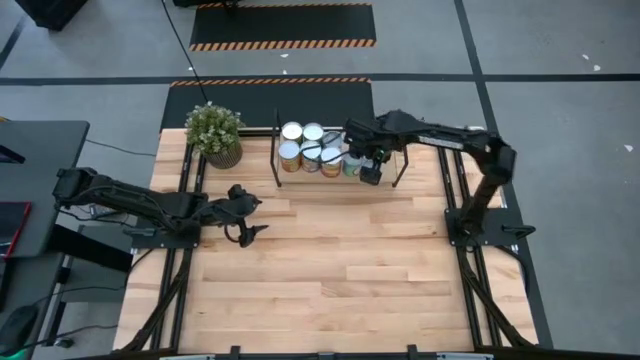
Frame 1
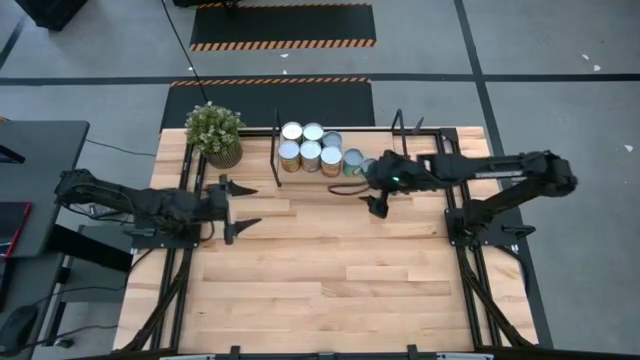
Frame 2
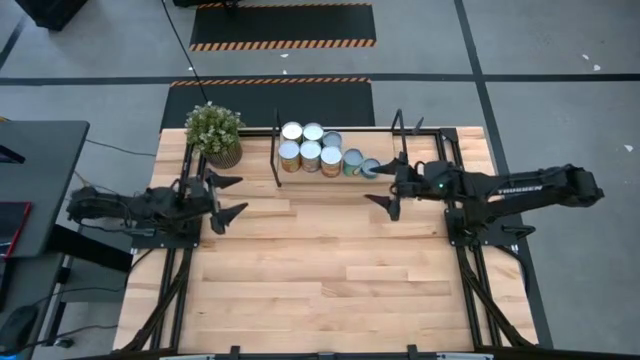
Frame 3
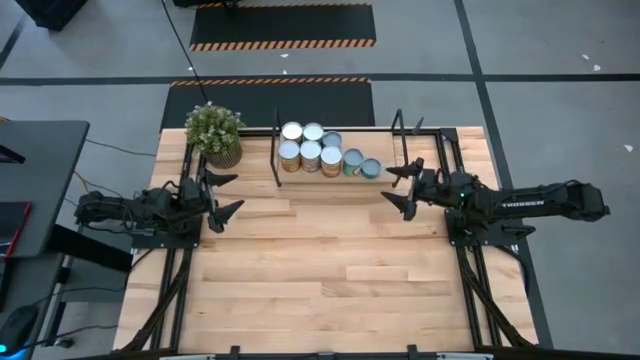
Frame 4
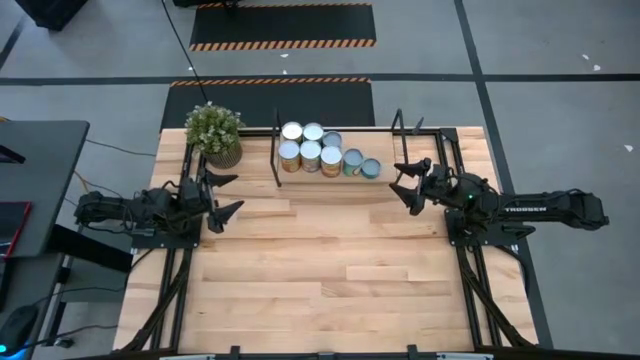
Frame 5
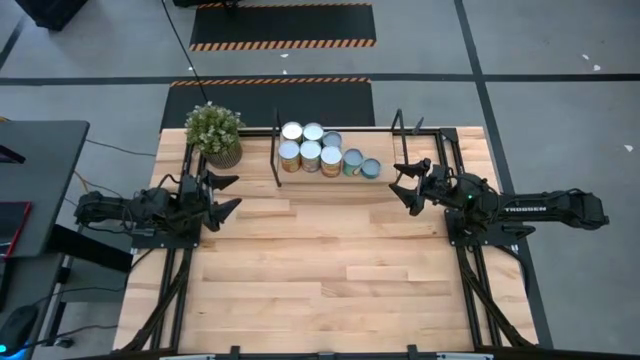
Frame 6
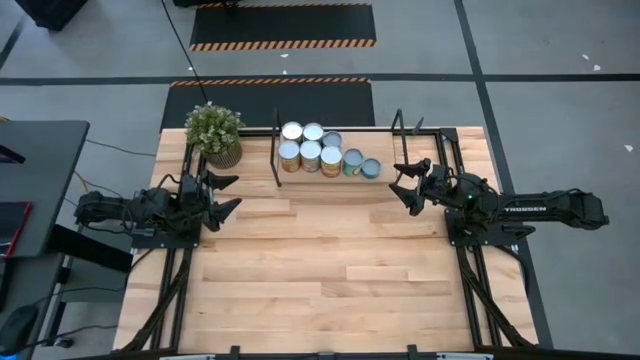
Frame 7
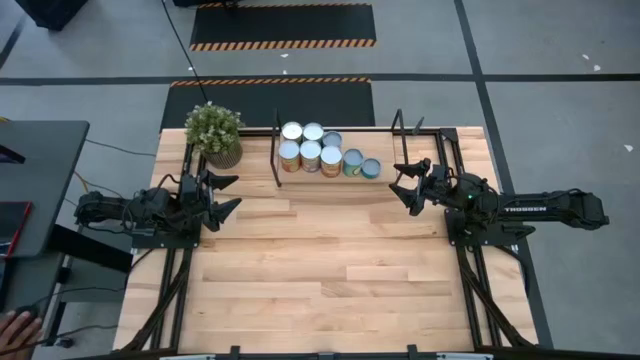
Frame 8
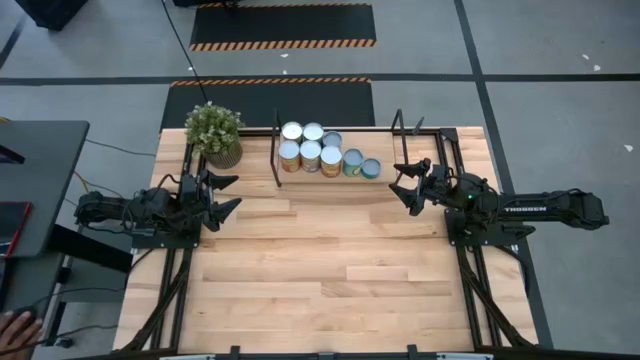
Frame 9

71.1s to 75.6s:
Task: Pick and place cans onto a shelf
Return to Home Position

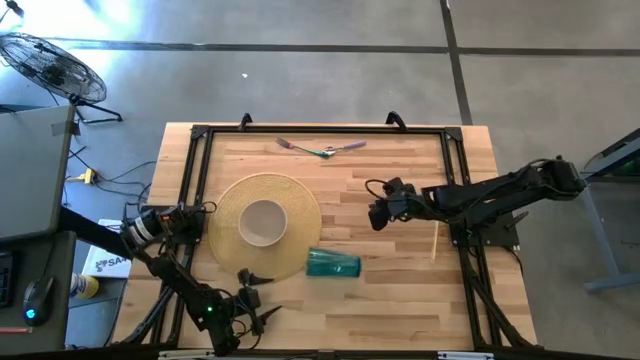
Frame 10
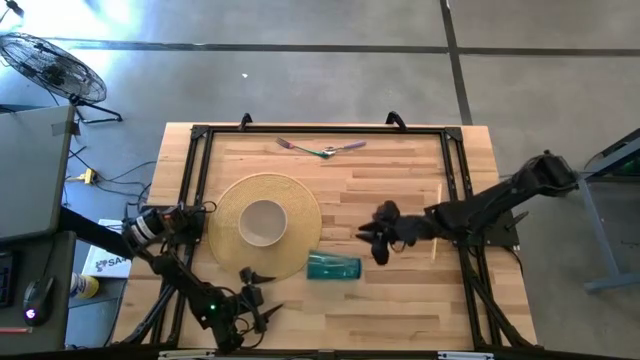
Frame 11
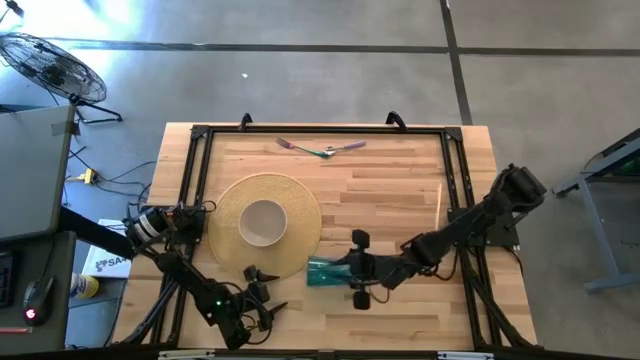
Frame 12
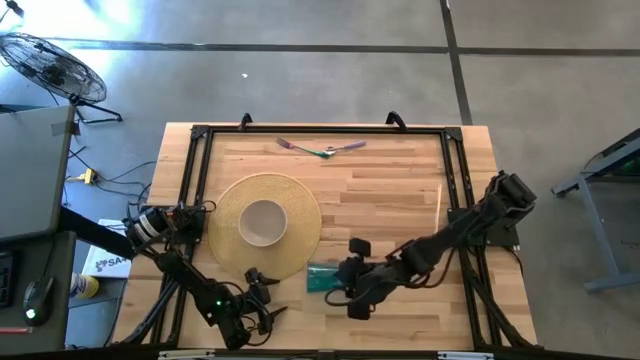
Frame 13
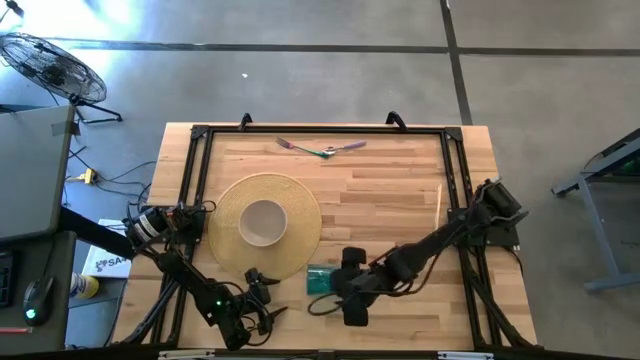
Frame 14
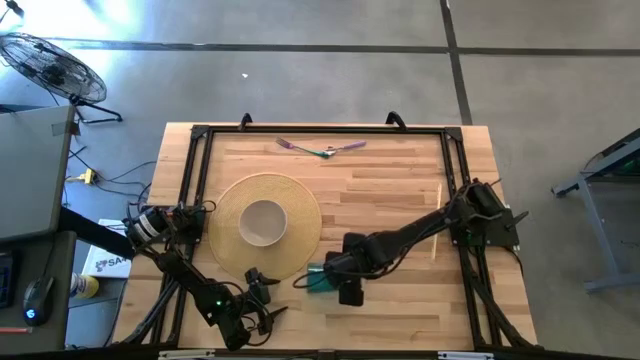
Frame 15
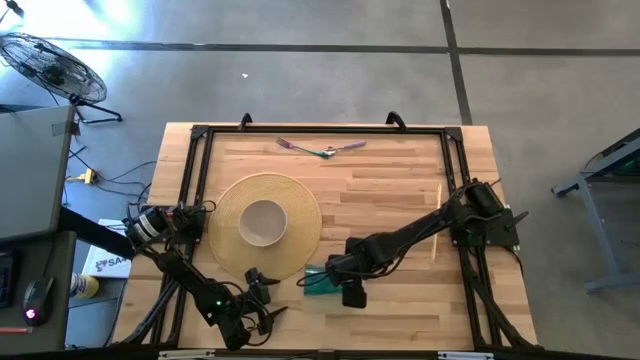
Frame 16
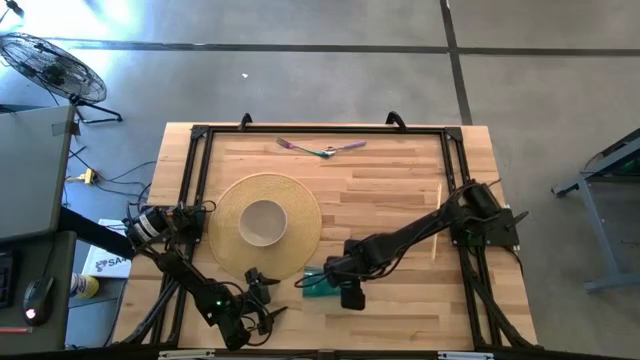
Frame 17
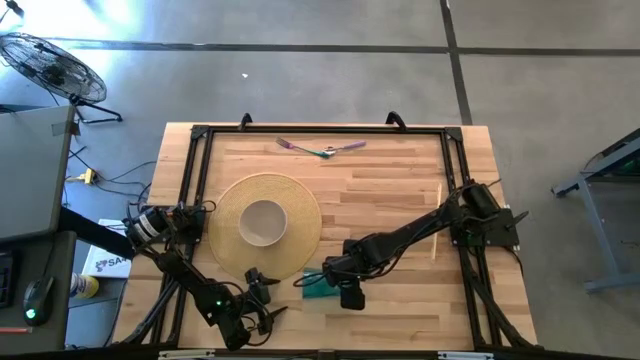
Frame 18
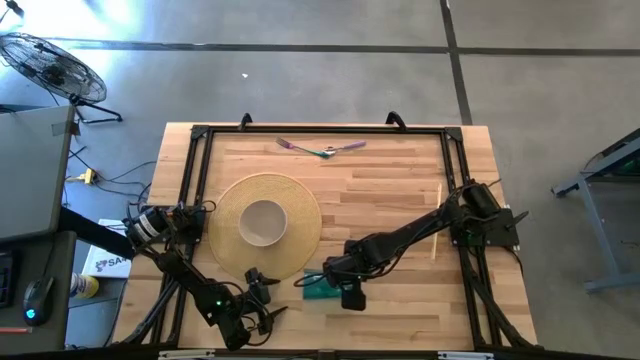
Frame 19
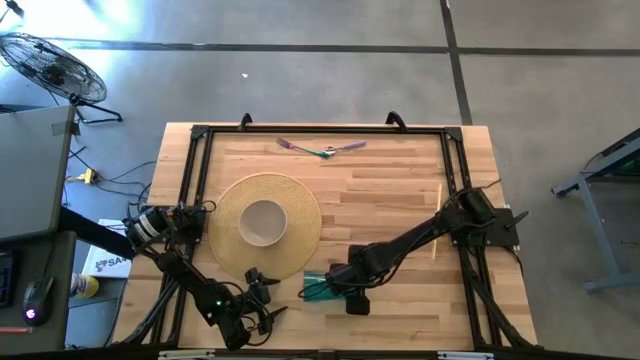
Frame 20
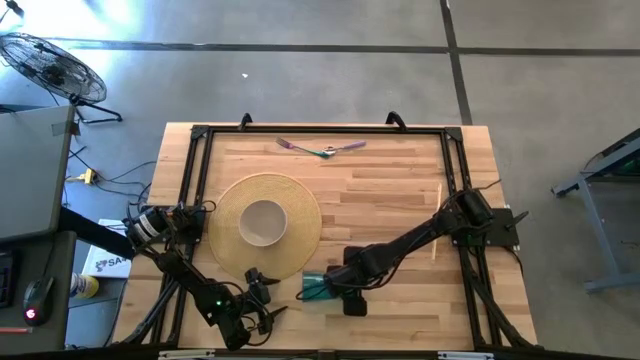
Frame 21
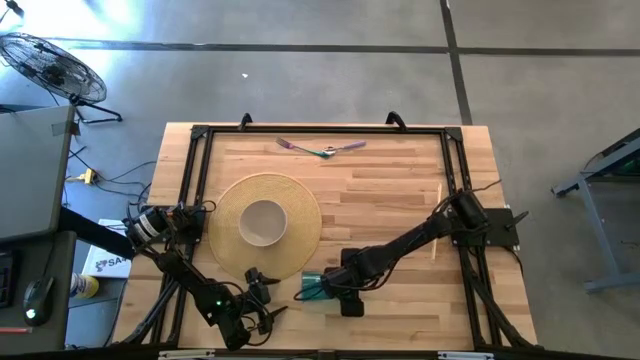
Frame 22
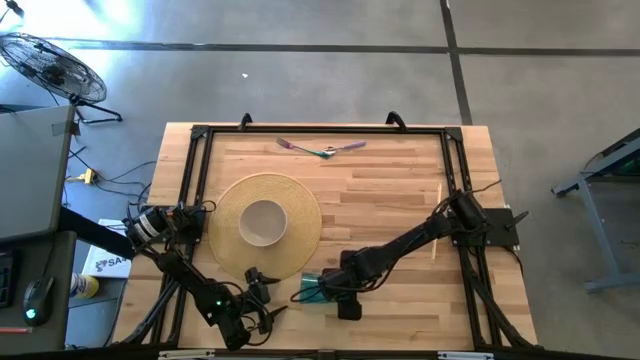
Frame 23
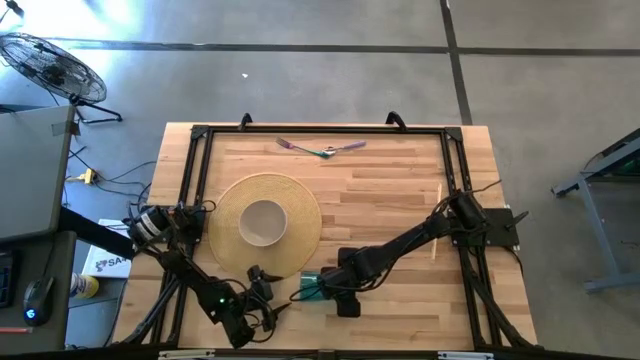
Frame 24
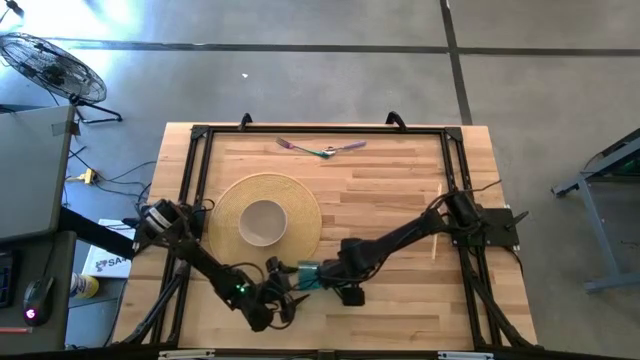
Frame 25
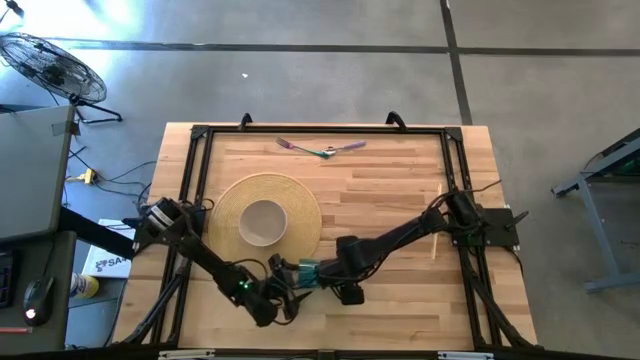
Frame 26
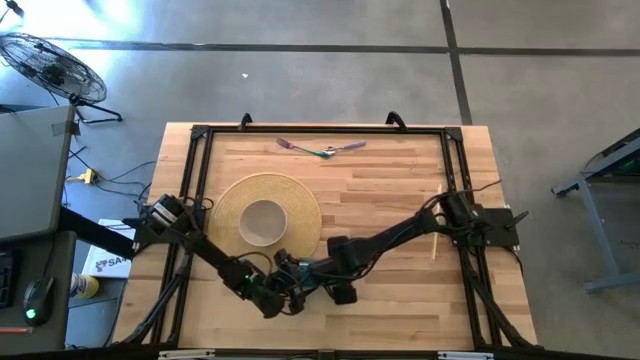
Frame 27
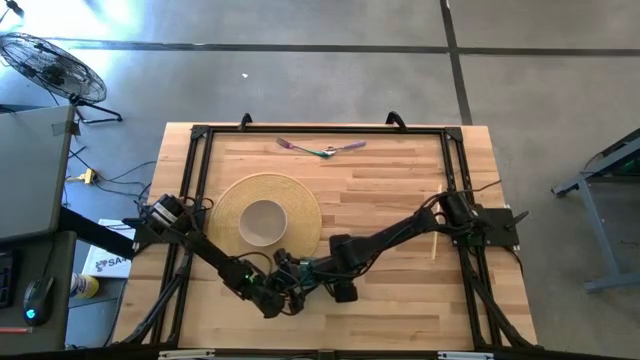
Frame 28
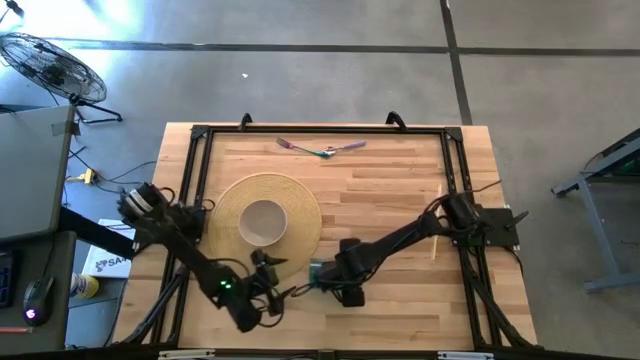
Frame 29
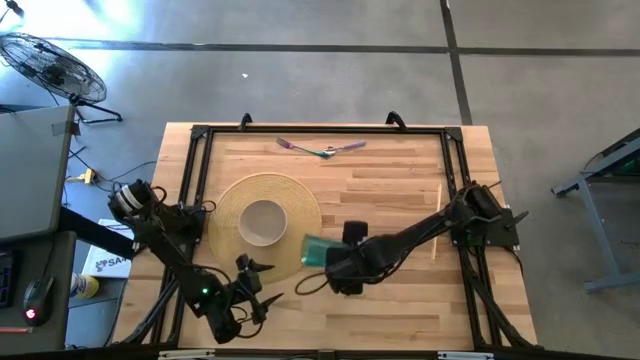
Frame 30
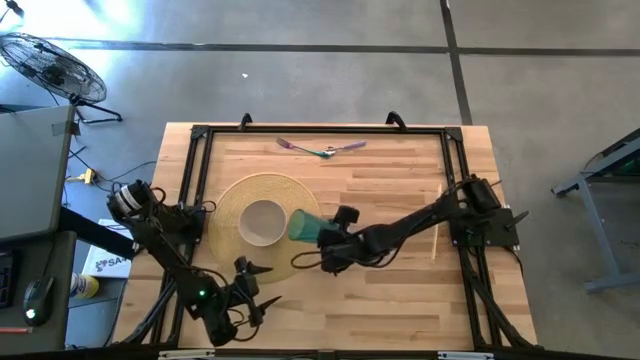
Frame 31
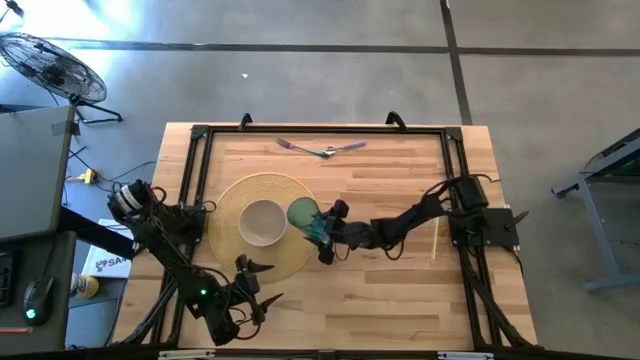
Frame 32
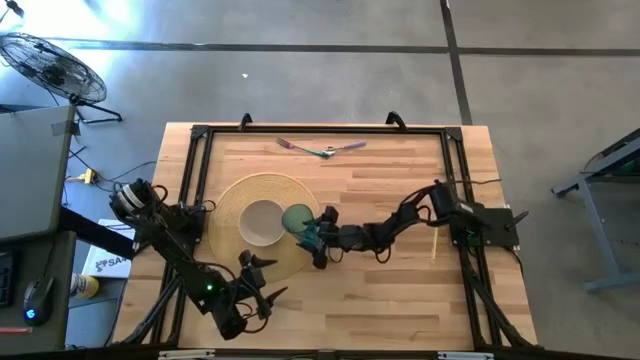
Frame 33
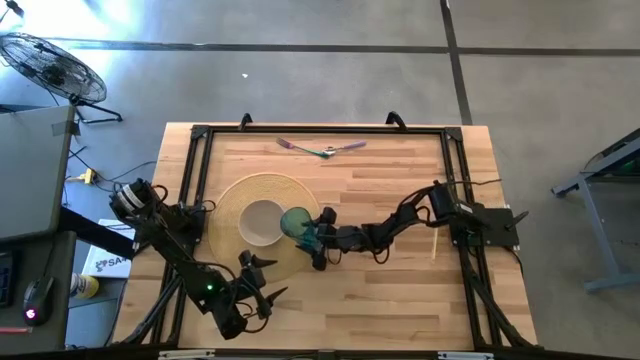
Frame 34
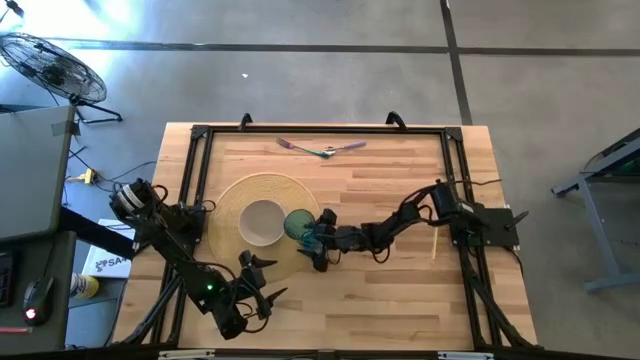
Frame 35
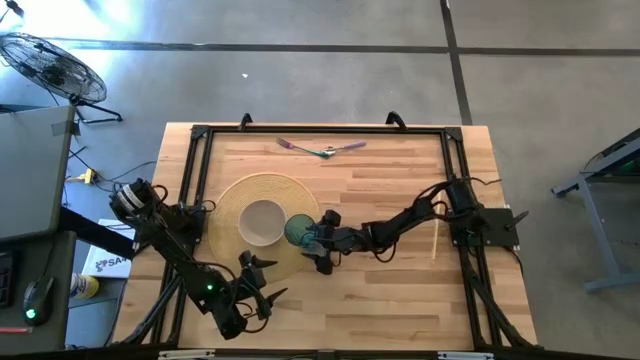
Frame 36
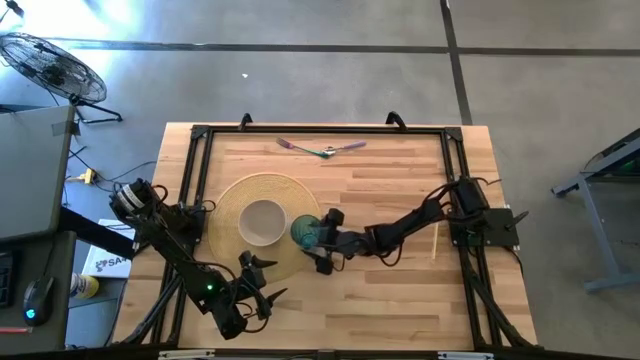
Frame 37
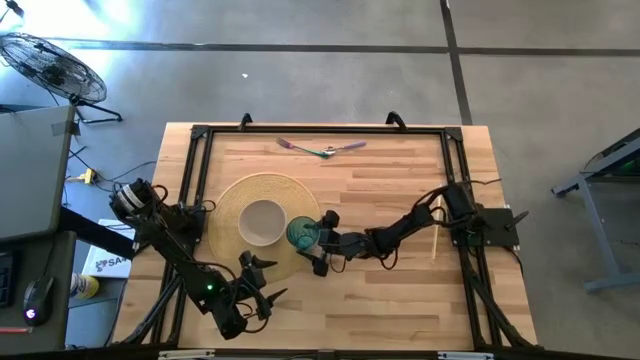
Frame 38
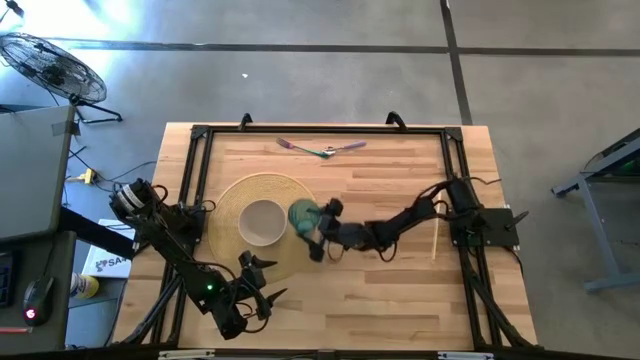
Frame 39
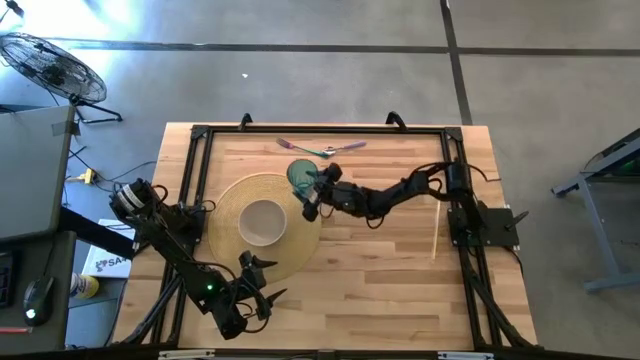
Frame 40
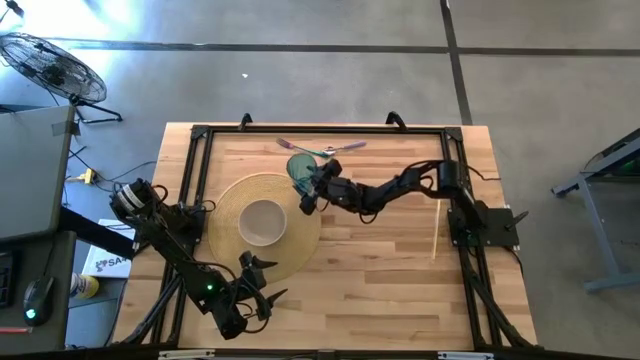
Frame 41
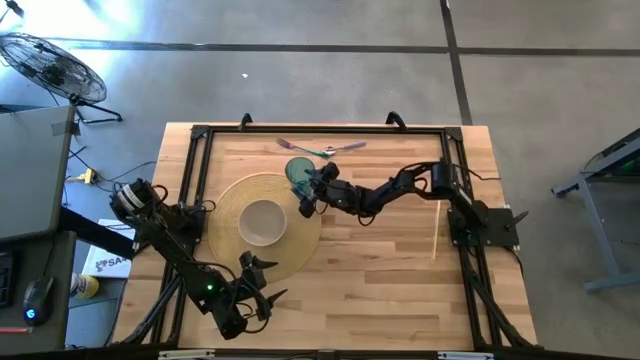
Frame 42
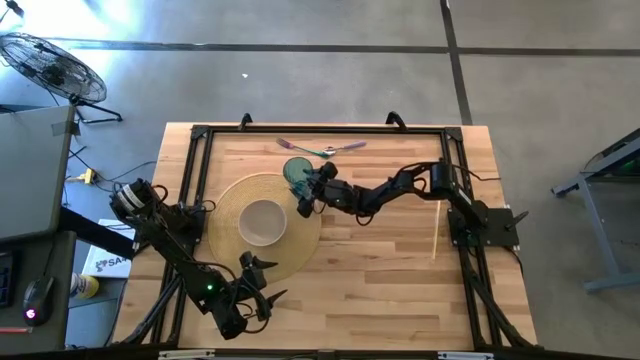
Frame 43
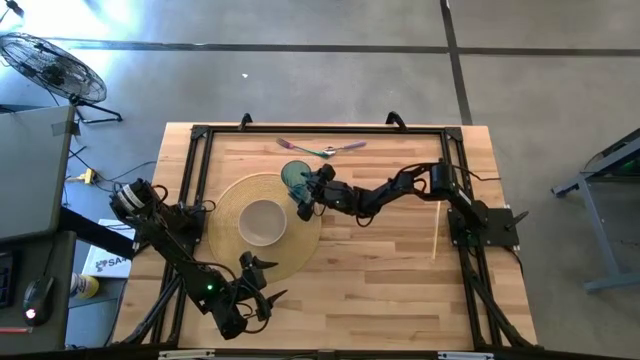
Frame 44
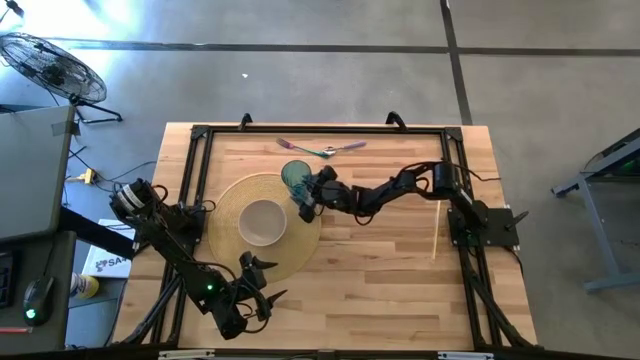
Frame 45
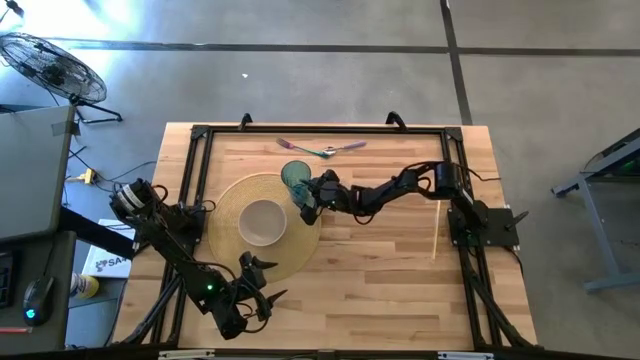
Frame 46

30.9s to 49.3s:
Task: Pick & Place Utensil
Put the blue cup on the brown mat to the top right of the white bowl
